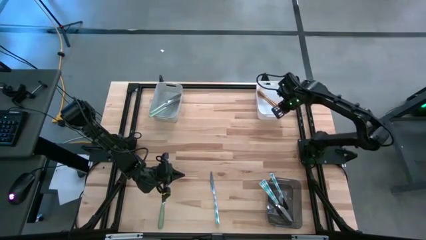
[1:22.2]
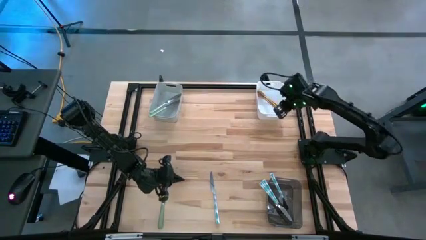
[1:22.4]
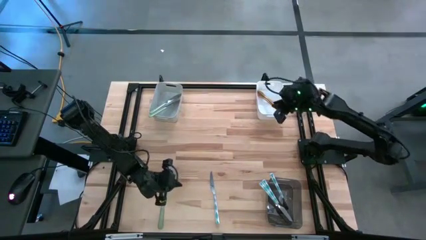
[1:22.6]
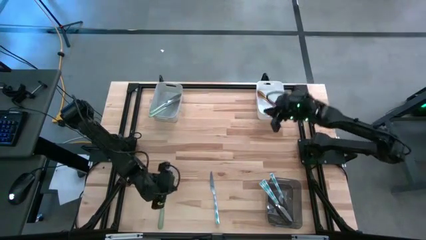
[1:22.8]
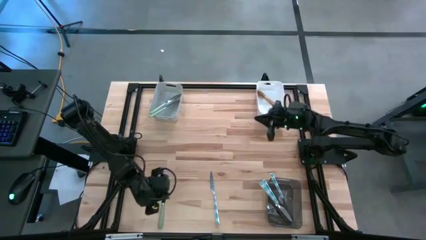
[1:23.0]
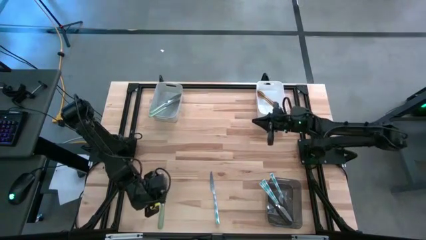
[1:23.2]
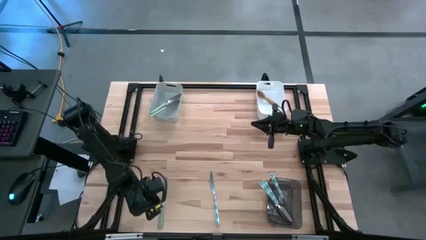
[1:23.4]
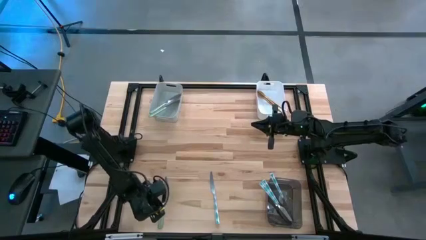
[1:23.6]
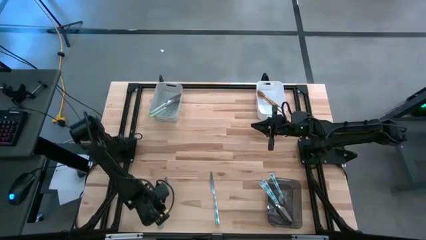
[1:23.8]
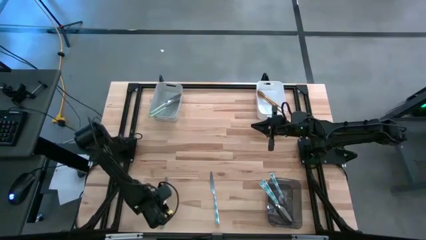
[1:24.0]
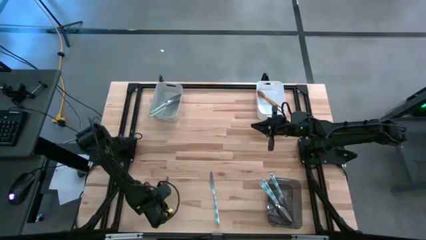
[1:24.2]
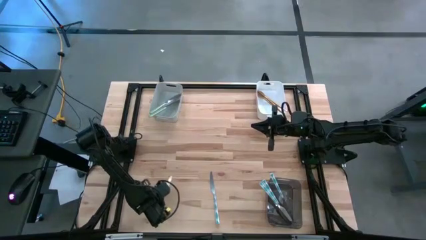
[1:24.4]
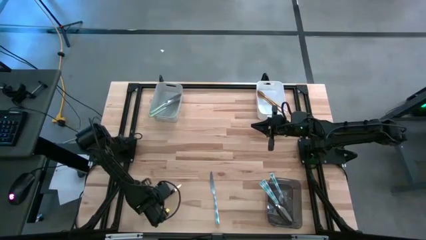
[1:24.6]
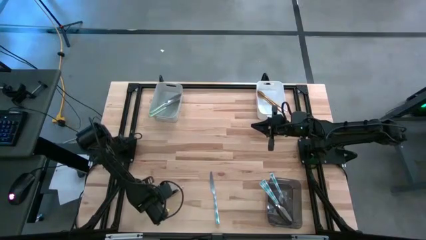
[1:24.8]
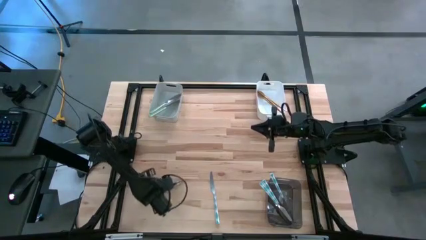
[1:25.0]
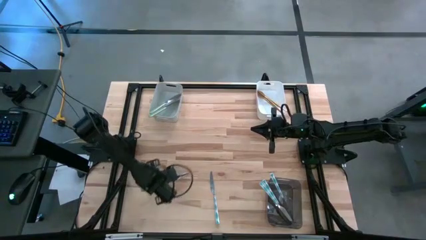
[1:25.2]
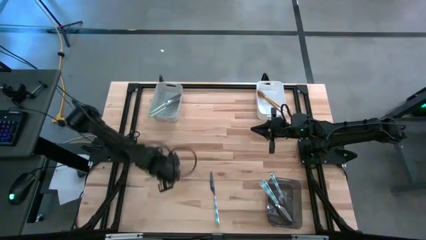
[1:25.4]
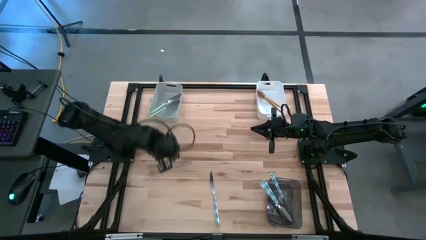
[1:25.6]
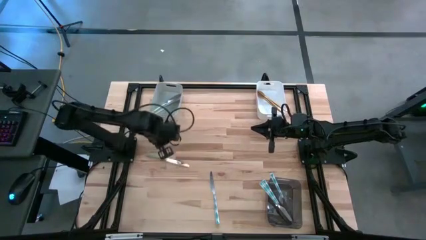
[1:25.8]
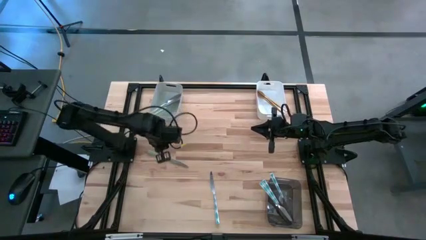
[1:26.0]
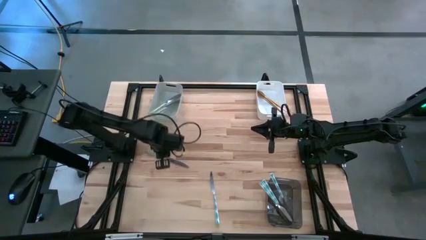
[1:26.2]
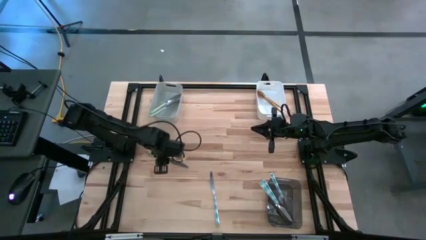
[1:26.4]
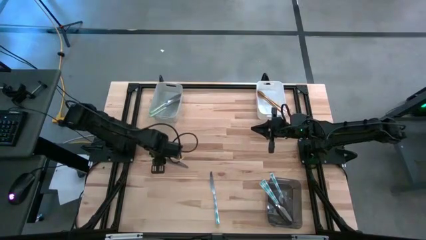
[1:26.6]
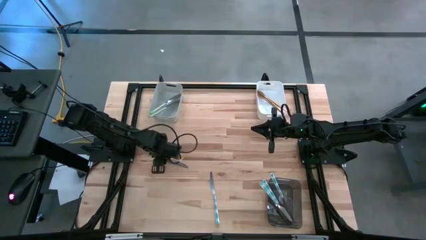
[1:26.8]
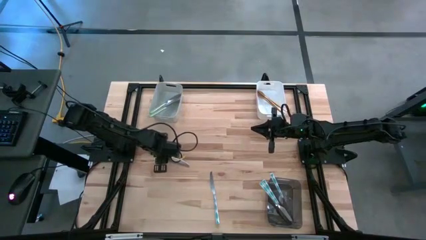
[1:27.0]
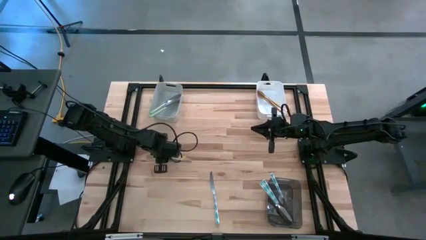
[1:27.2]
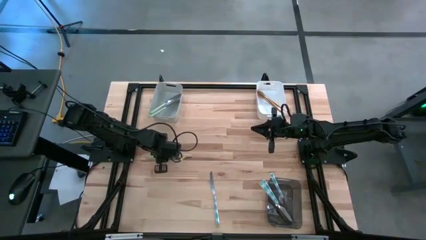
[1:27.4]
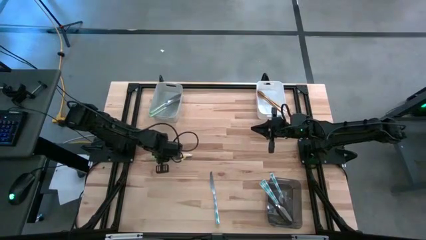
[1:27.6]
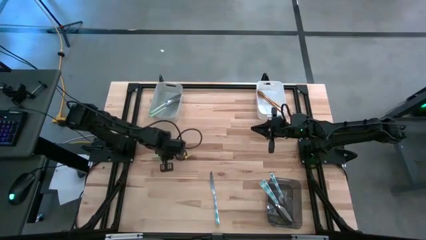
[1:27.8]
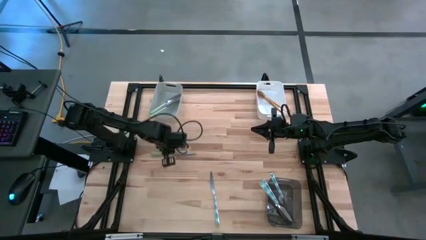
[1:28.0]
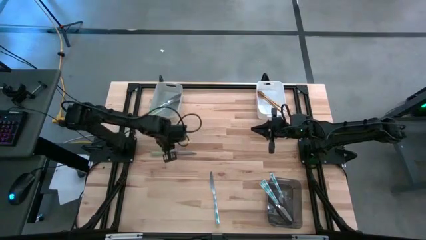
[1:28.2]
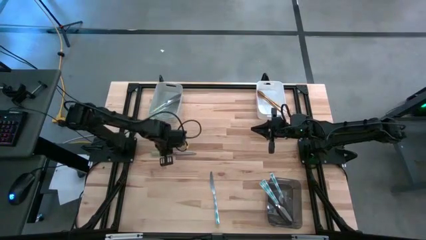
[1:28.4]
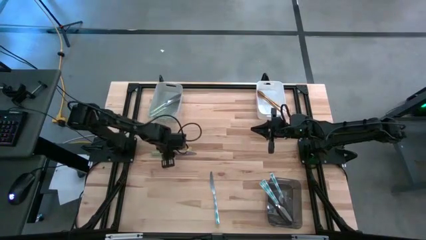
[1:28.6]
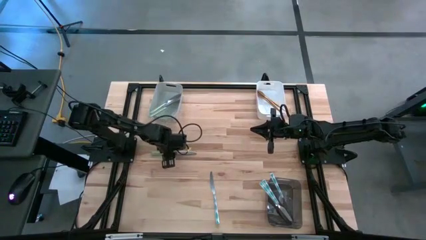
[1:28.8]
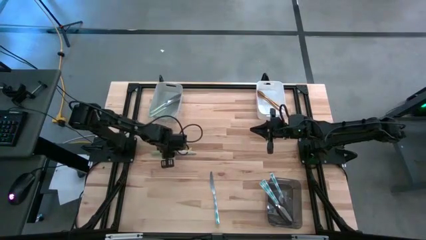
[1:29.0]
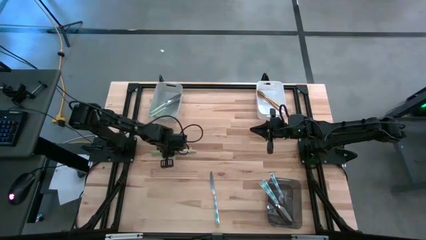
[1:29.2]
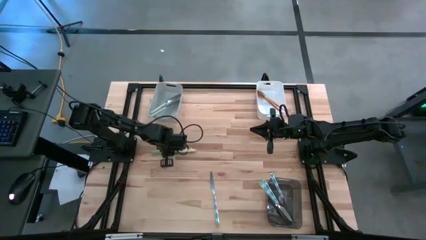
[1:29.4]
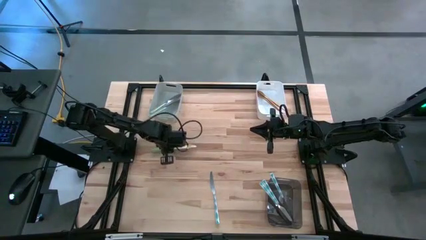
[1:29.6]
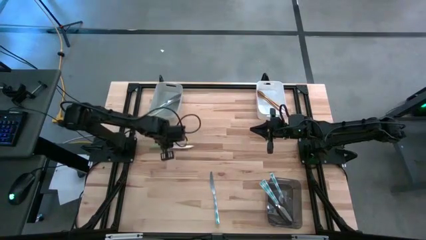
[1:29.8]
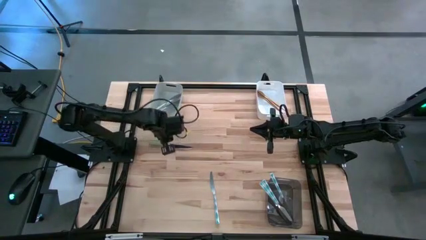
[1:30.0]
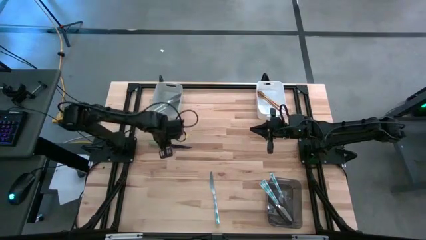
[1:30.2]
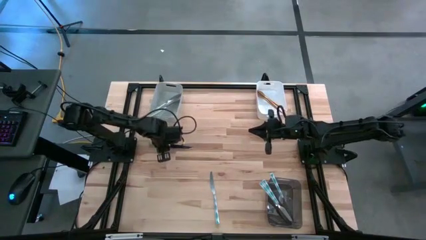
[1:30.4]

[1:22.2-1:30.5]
Task: Sort silverware by color (type)
Put the green knife into the gray bin

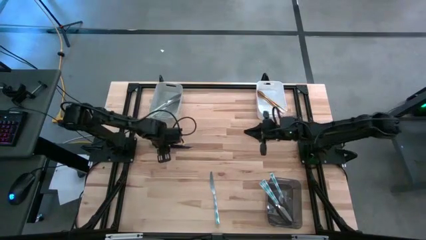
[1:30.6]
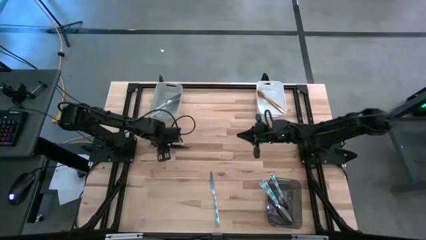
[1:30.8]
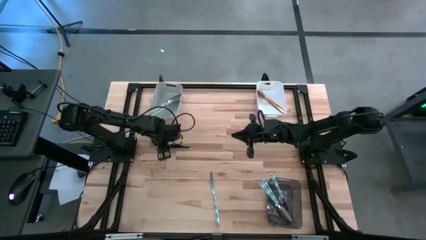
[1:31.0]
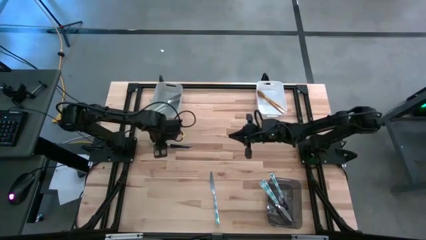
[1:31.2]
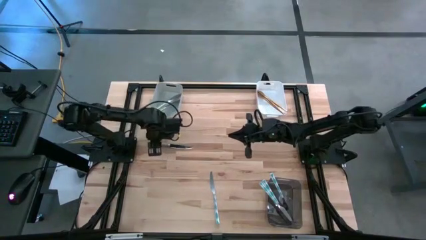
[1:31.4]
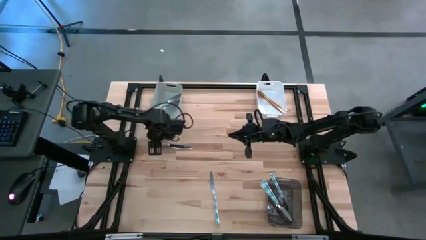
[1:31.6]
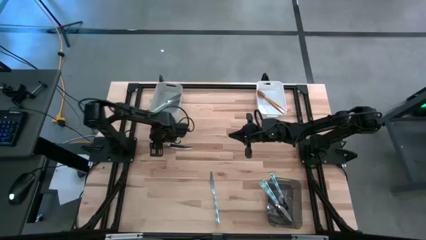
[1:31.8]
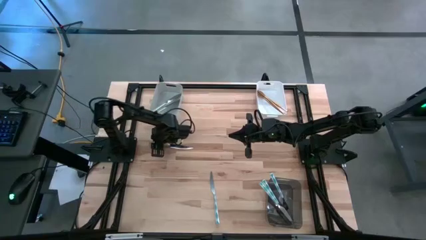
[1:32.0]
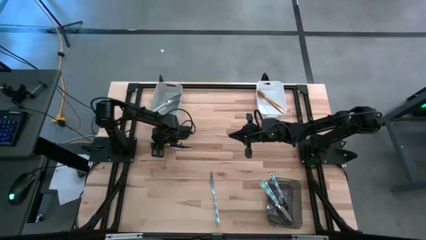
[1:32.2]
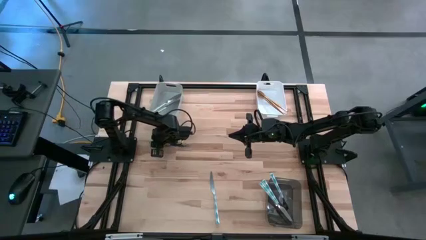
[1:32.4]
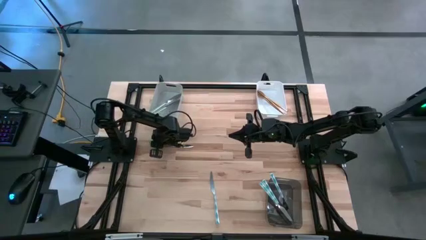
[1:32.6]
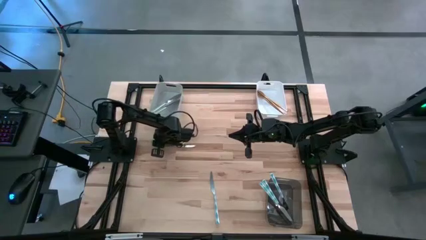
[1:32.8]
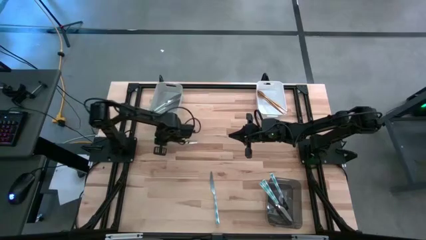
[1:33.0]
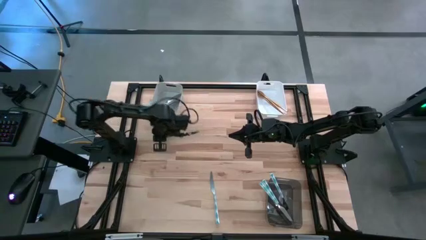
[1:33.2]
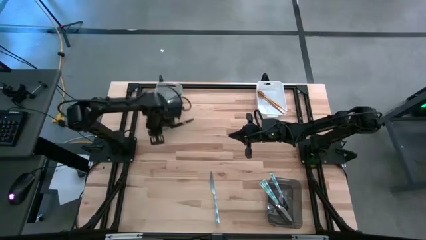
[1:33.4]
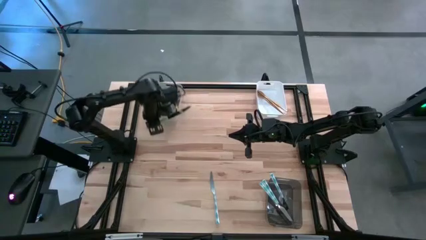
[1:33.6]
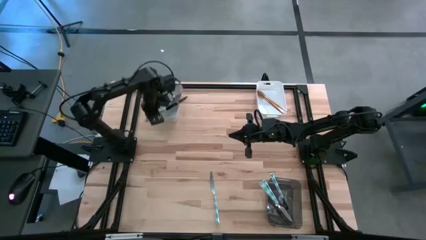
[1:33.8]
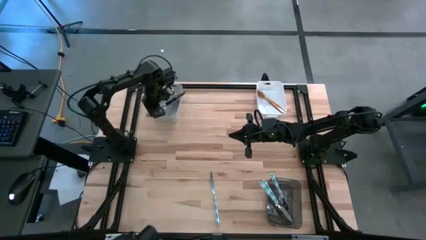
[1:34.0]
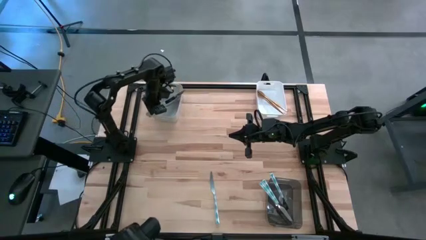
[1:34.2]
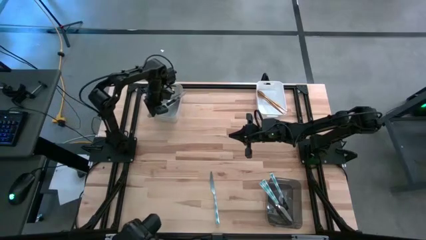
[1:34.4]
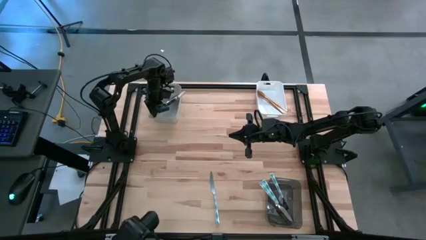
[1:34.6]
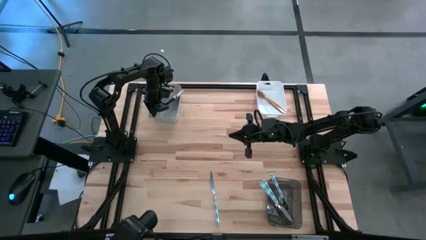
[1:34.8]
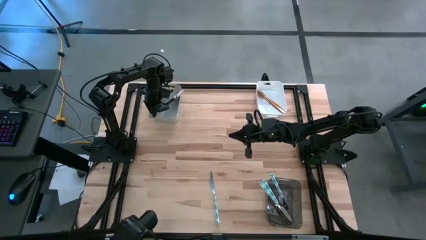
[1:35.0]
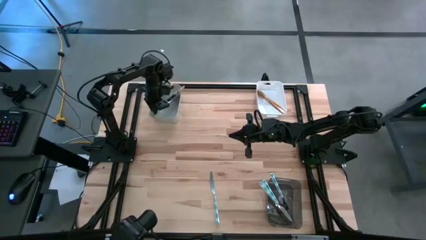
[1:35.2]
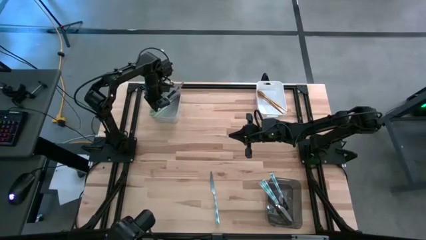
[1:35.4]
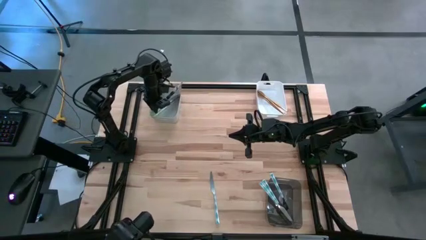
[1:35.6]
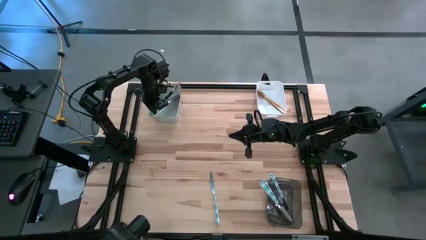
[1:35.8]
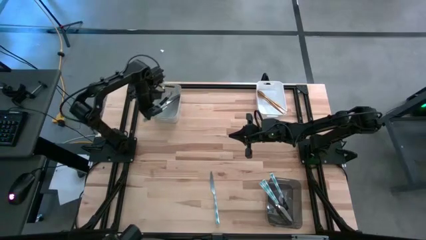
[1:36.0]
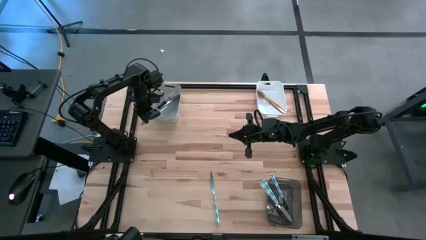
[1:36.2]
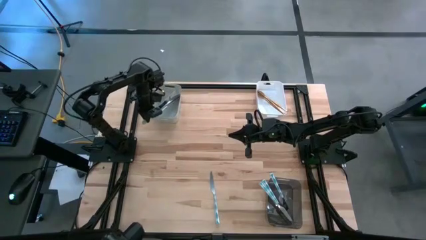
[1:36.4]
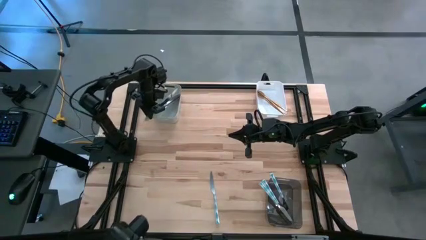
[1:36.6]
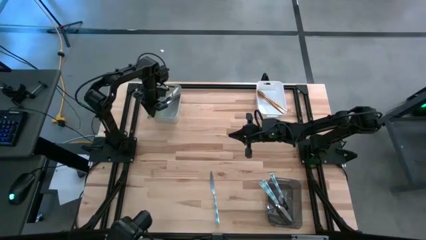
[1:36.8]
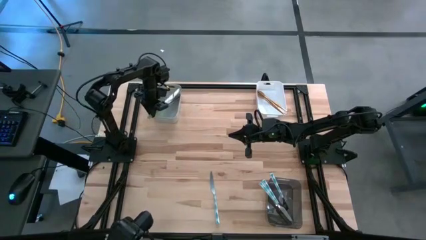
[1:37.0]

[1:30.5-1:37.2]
Put the green knife into the gray bin
